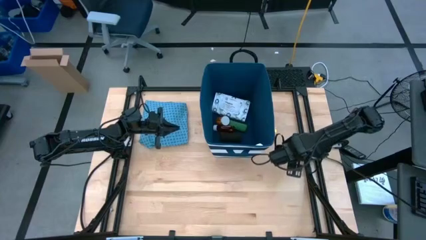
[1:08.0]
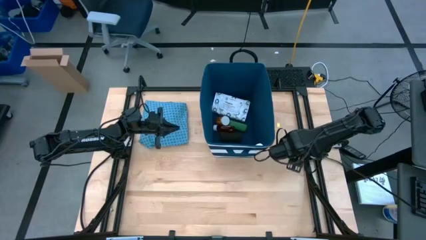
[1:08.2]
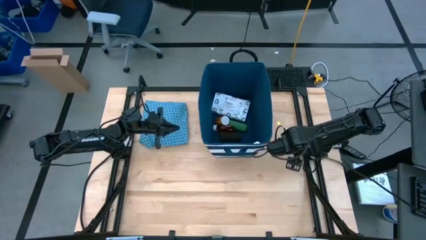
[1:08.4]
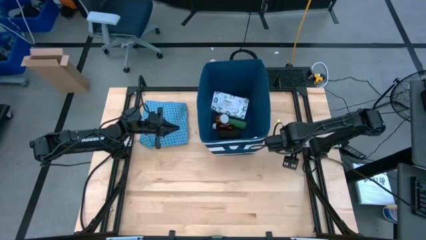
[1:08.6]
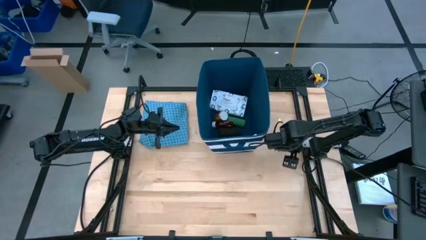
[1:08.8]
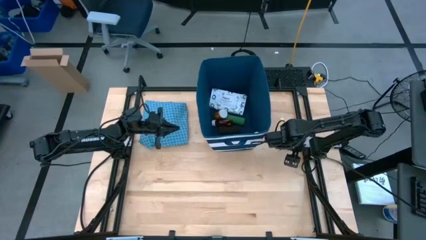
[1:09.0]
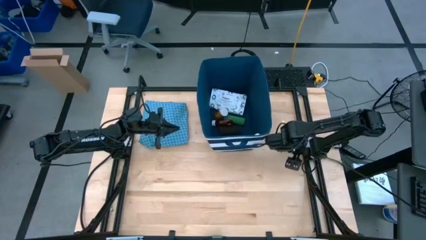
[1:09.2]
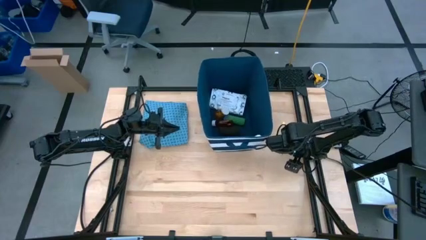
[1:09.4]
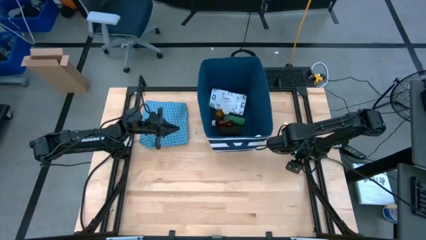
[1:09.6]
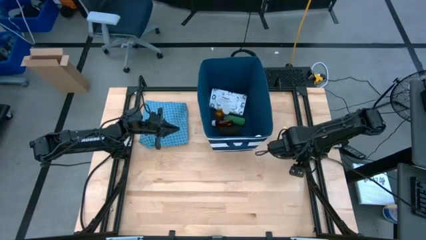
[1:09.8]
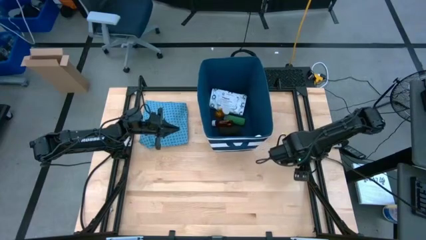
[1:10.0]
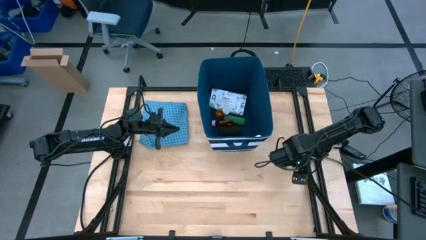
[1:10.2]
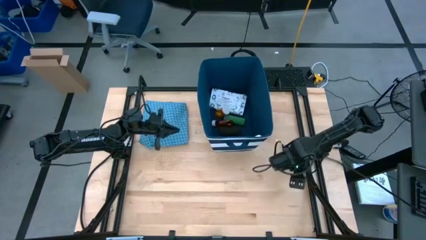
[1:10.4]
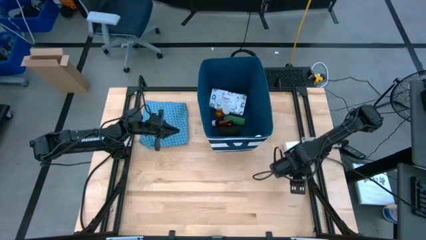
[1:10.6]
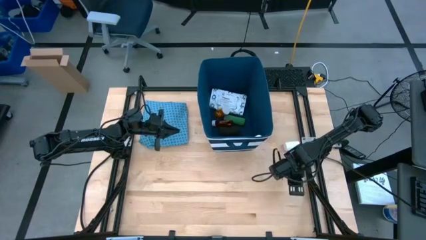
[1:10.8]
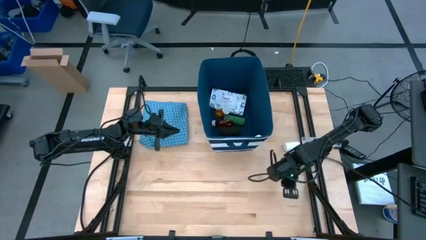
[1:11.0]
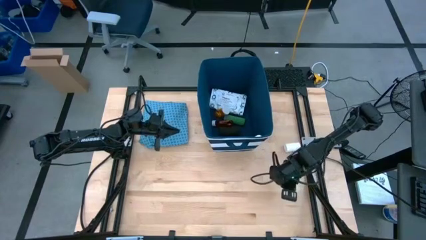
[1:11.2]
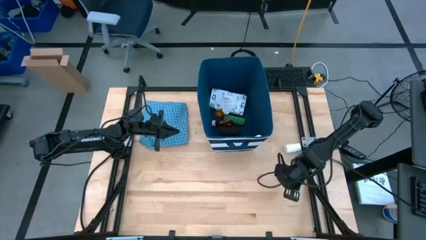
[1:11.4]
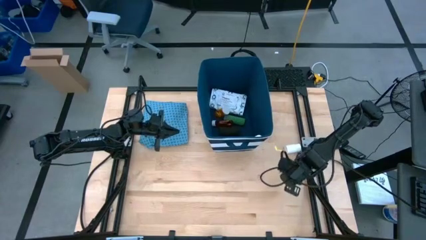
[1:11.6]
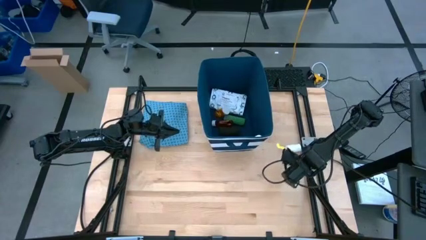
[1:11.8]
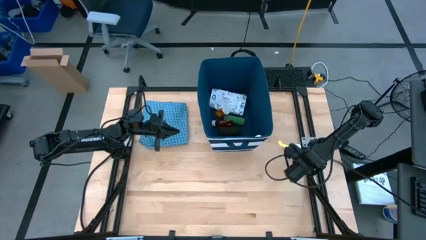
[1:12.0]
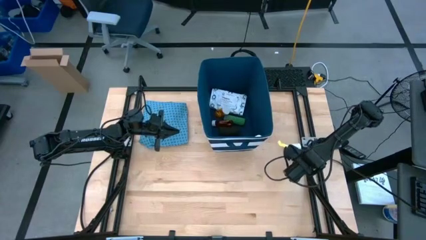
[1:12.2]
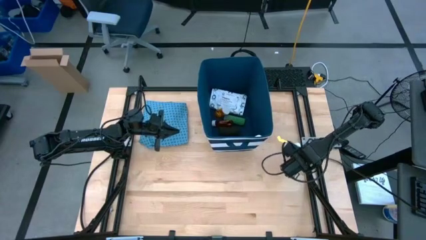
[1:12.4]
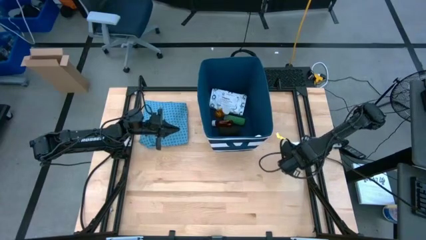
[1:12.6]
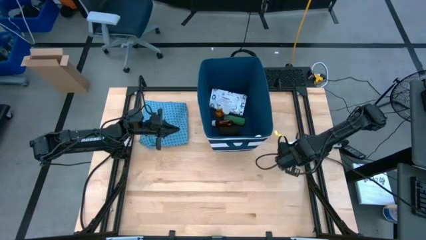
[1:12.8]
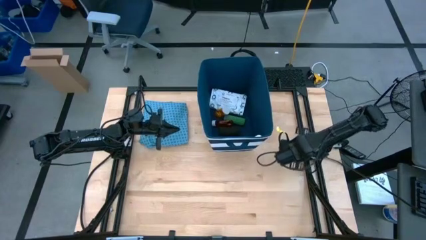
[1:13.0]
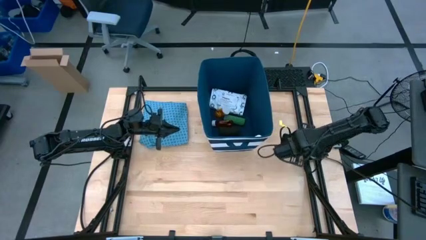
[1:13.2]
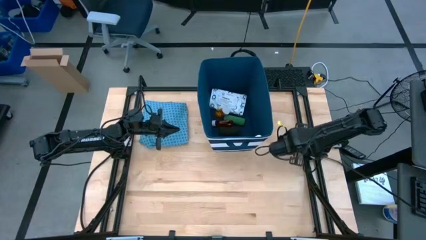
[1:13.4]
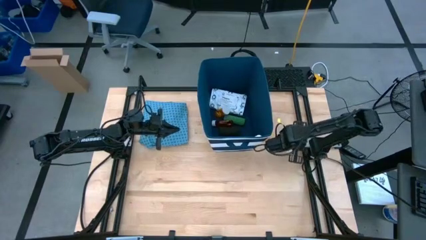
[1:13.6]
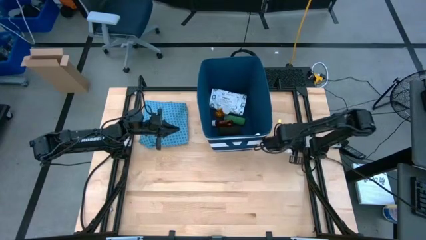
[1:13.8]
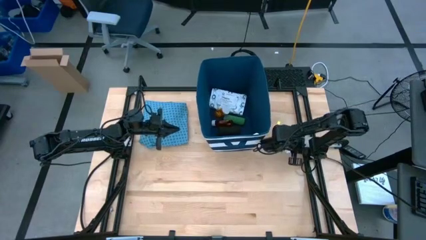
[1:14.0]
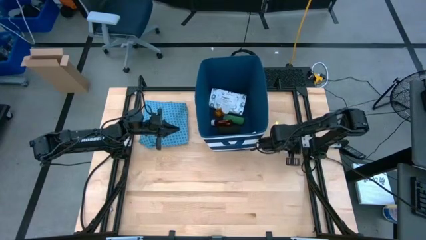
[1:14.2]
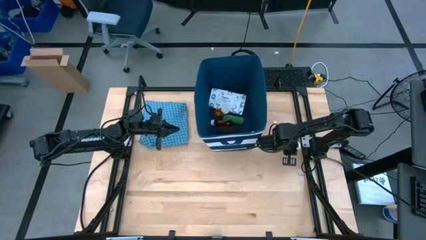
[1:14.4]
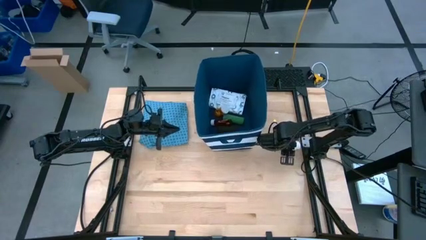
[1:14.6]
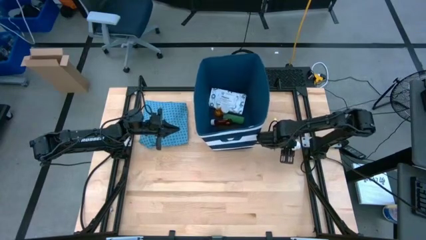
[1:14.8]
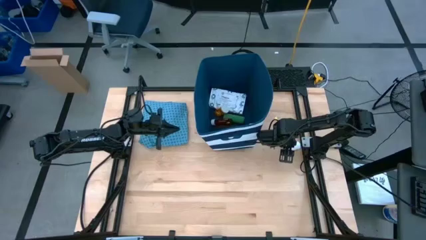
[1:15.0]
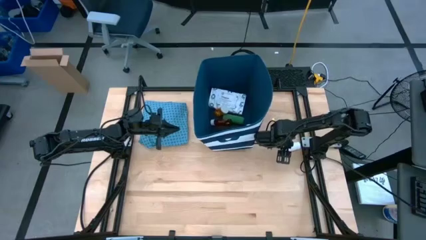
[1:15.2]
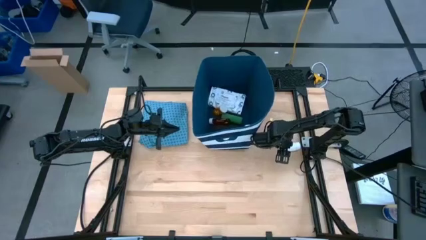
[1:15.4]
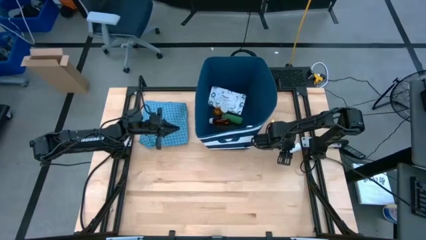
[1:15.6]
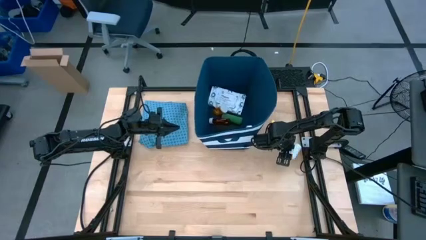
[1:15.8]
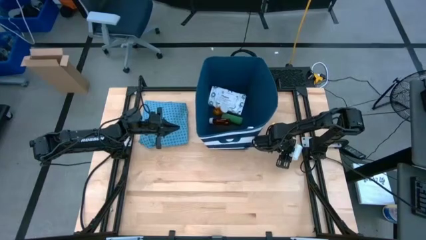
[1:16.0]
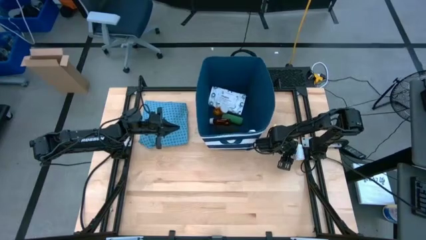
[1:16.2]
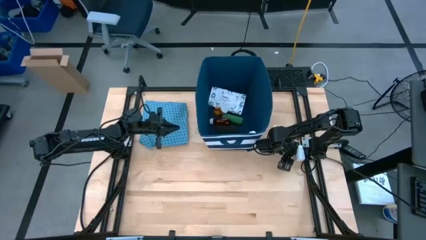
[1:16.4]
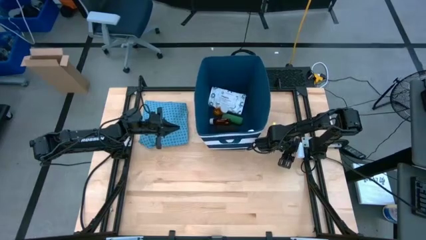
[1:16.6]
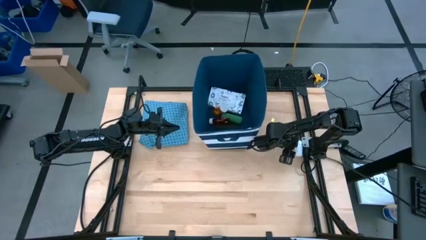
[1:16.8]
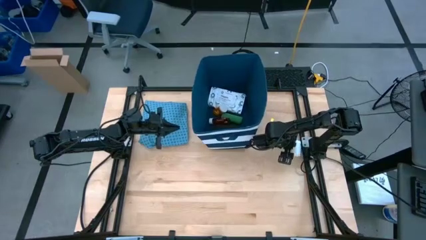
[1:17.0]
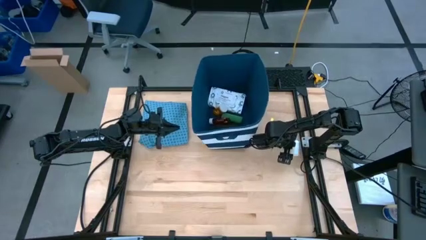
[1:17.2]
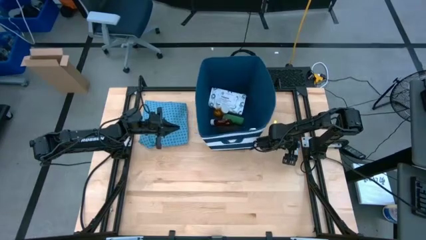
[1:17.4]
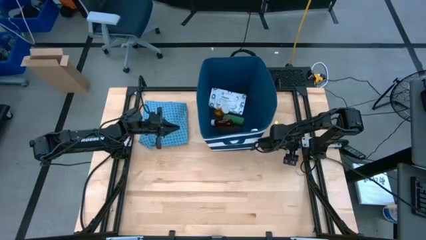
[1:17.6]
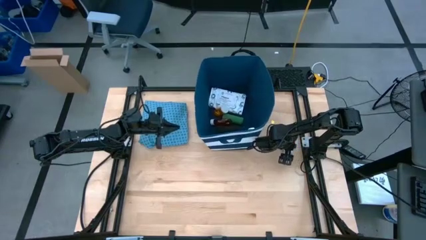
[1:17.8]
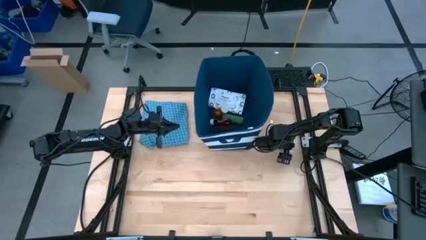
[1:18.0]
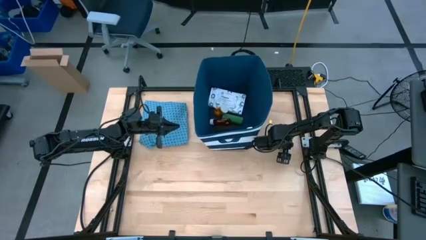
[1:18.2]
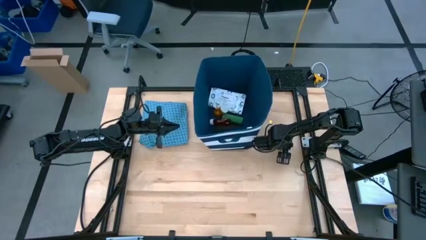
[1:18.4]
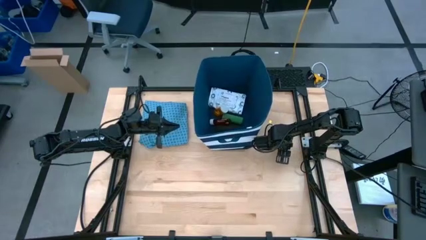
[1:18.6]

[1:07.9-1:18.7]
Task: Pick & place medical supplies in basket/bin
Put the white pill bottle into the blue bin

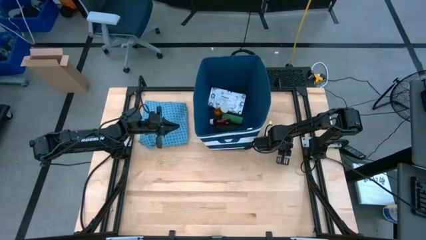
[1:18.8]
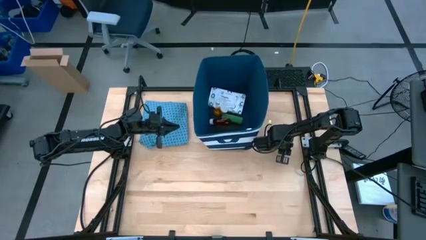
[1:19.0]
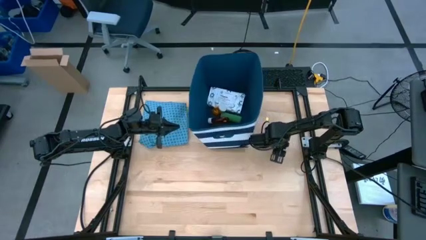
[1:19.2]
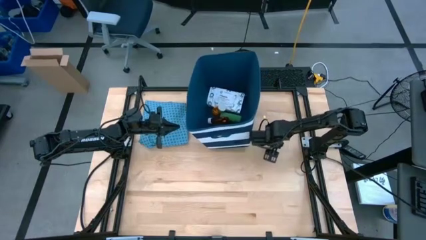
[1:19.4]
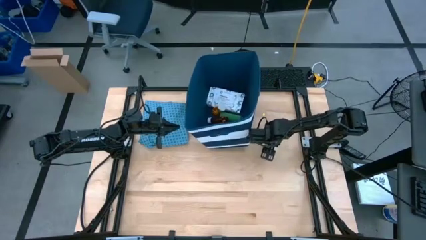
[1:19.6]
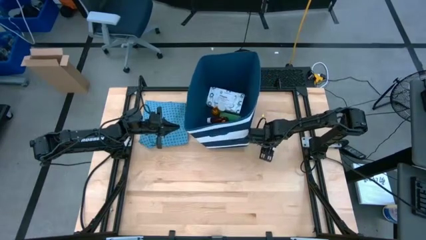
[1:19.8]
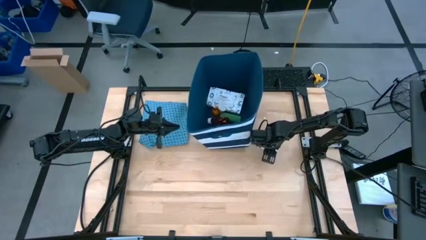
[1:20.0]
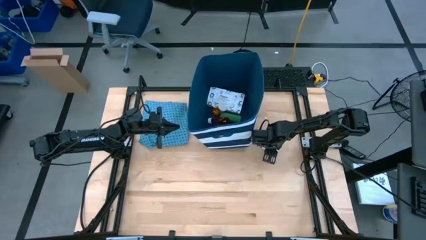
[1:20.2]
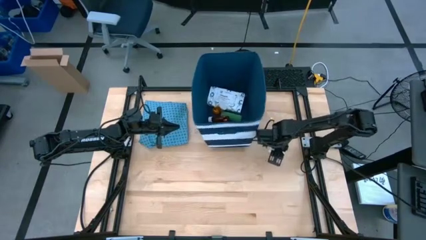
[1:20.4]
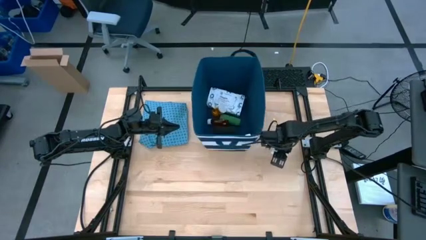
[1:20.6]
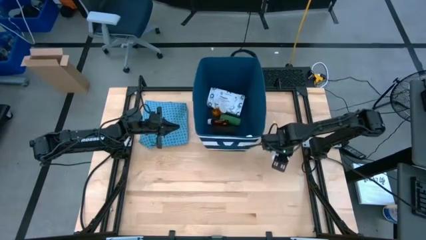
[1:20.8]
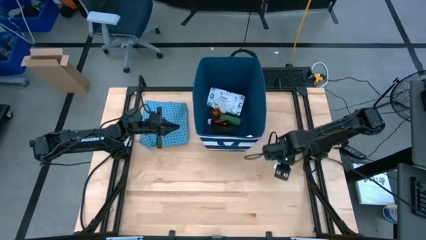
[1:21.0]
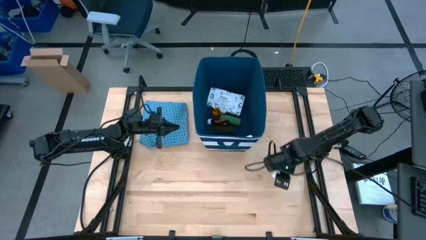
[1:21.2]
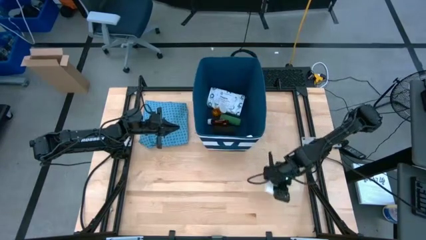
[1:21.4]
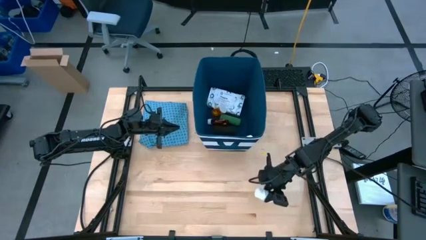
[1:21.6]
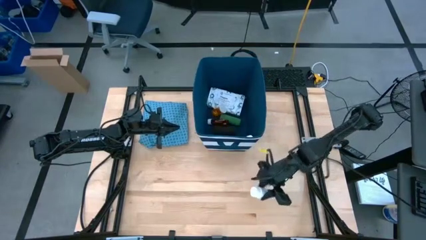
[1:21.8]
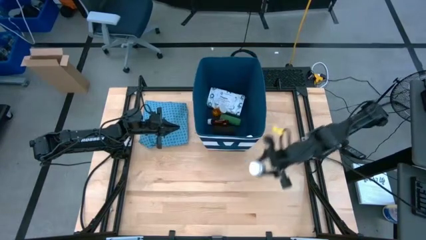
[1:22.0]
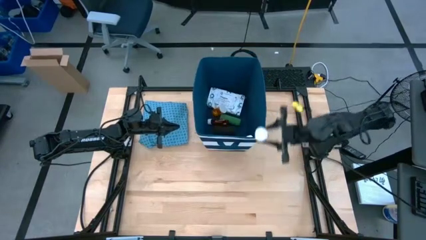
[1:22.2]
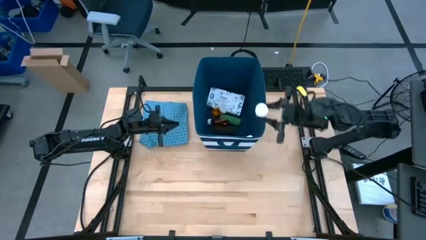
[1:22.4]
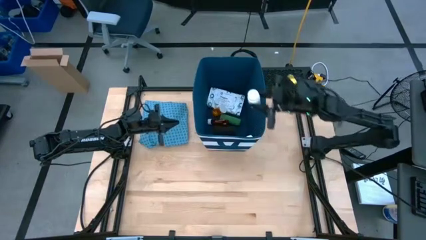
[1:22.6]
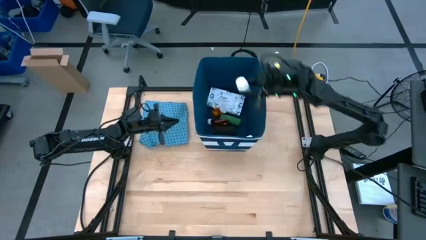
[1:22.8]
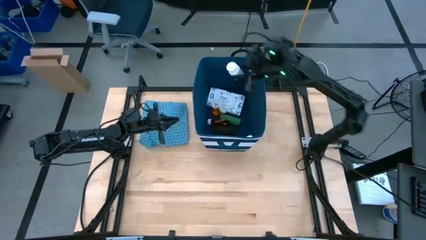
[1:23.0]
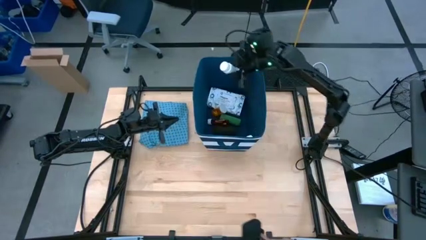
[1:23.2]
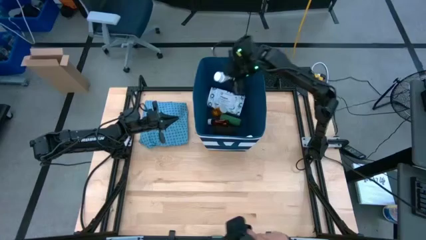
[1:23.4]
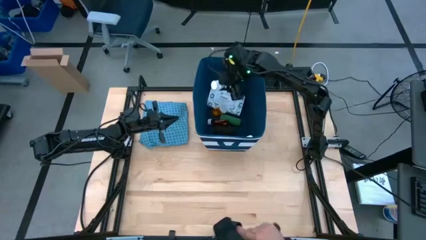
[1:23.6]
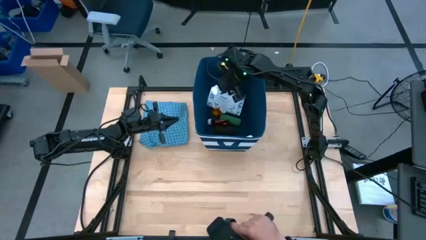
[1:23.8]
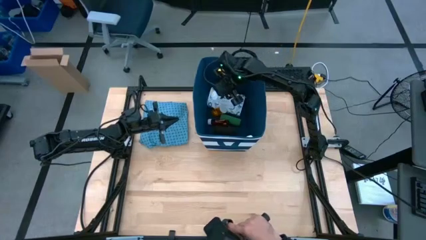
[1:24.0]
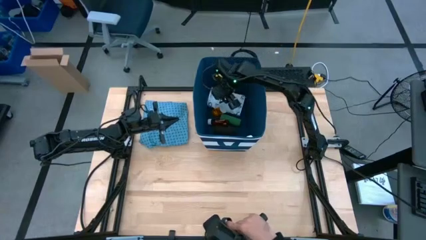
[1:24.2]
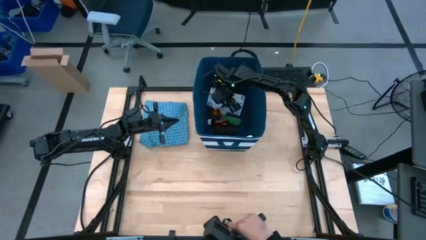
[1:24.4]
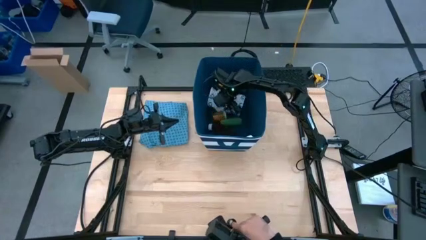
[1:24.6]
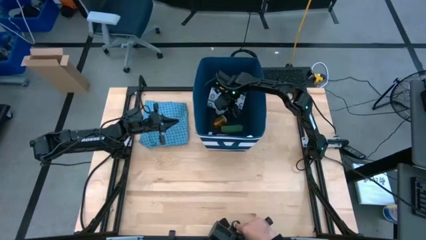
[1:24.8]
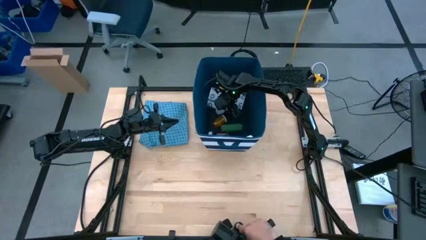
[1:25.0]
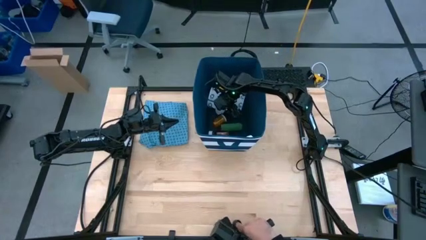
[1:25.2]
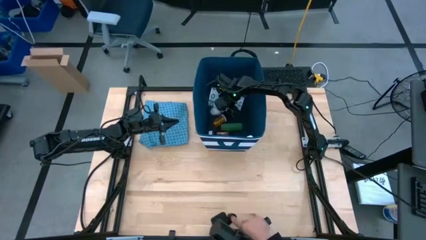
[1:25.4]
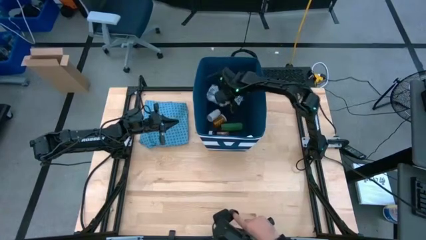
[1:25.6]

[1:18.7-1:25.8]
Put the white pill bottle into the blue bin
